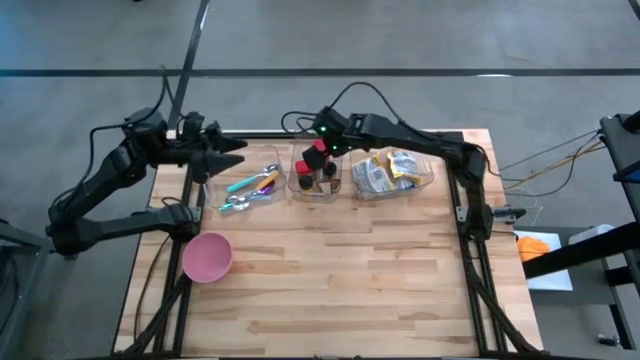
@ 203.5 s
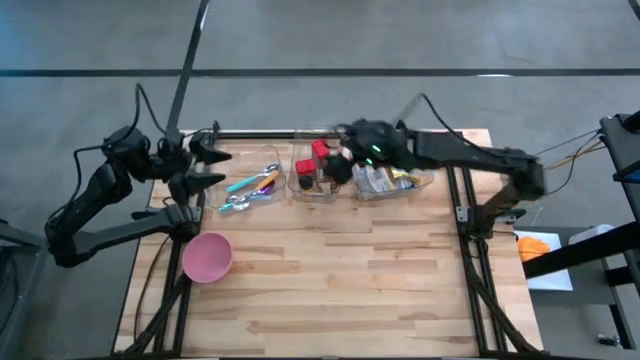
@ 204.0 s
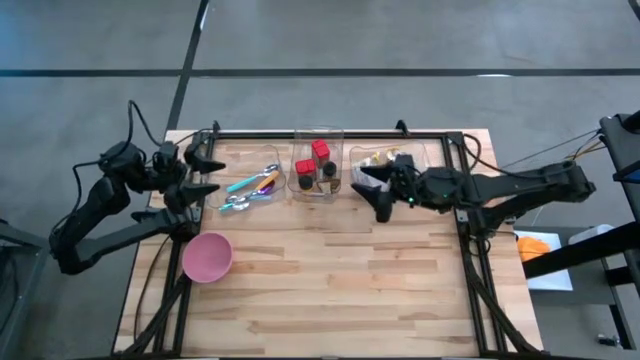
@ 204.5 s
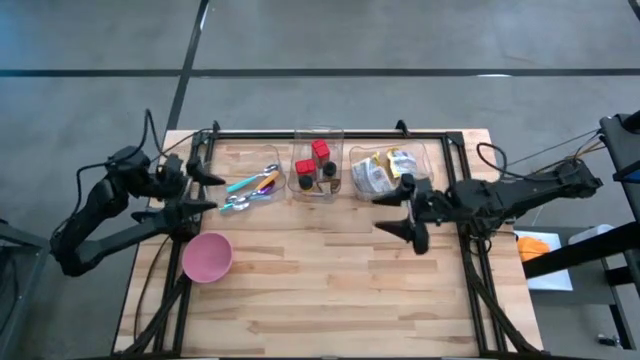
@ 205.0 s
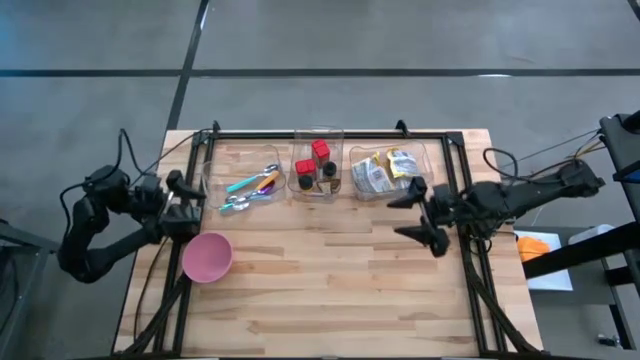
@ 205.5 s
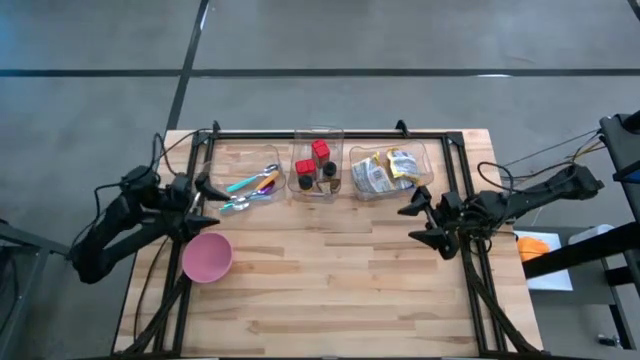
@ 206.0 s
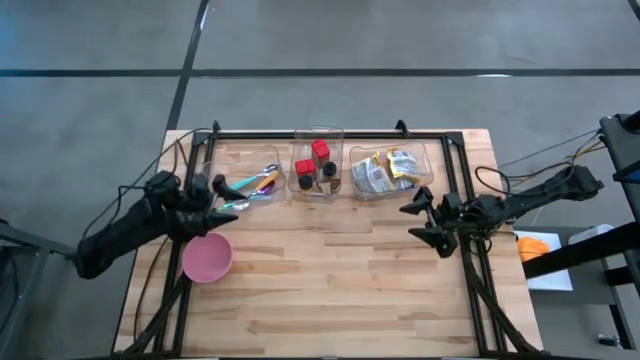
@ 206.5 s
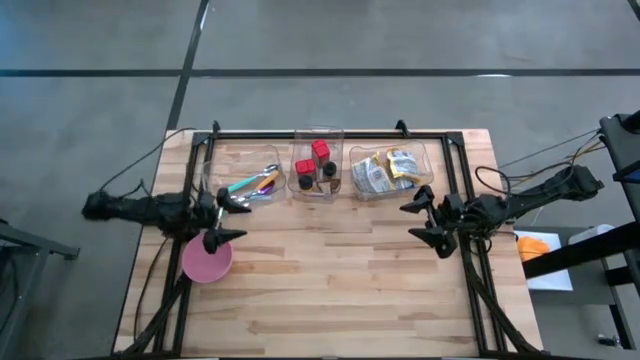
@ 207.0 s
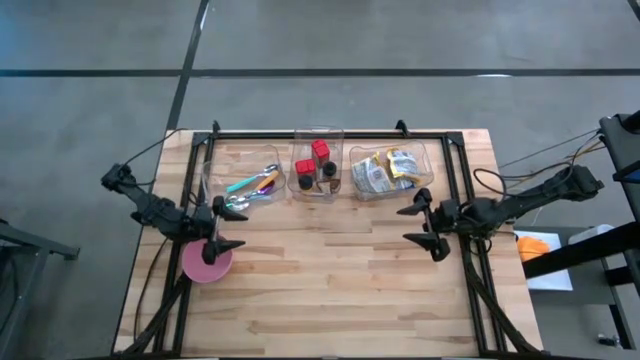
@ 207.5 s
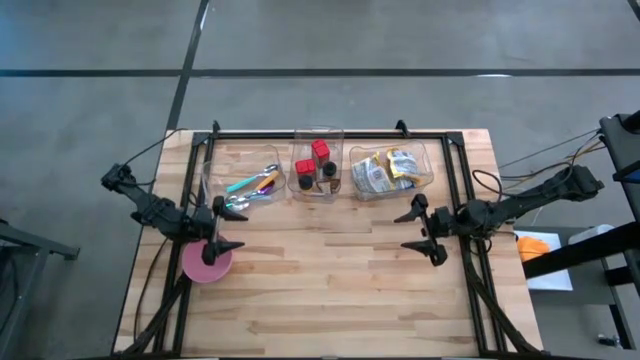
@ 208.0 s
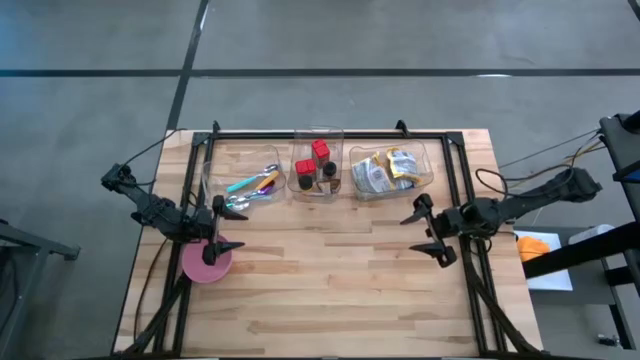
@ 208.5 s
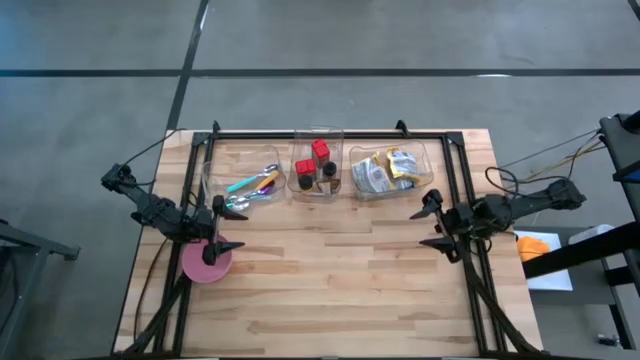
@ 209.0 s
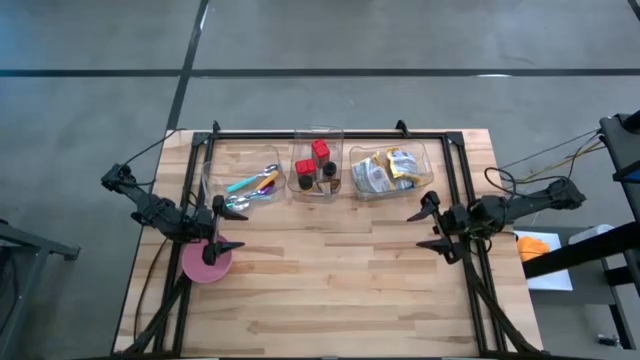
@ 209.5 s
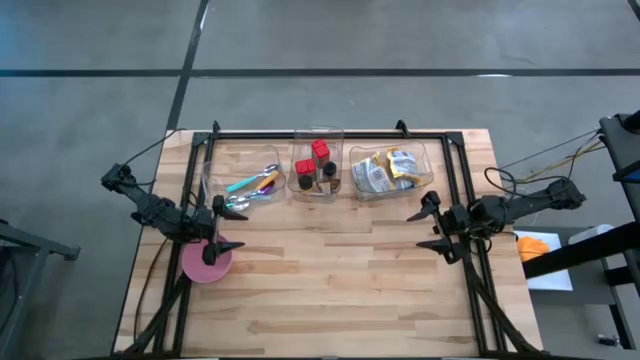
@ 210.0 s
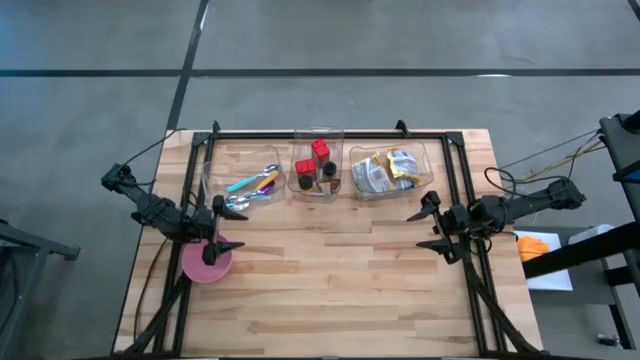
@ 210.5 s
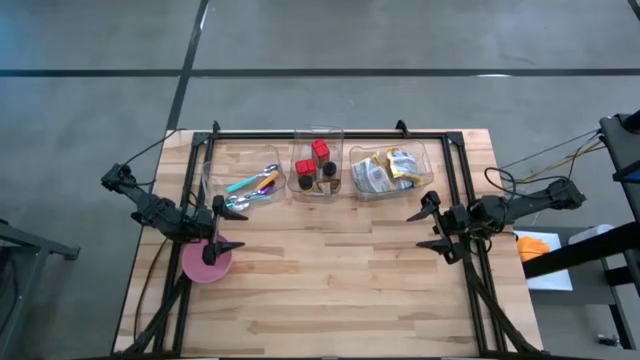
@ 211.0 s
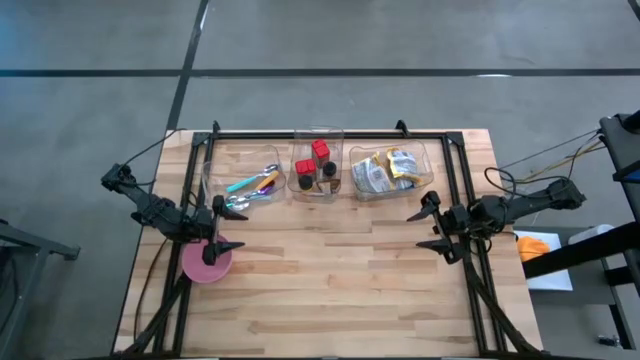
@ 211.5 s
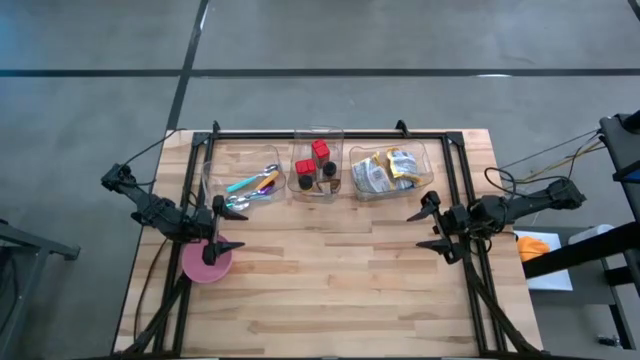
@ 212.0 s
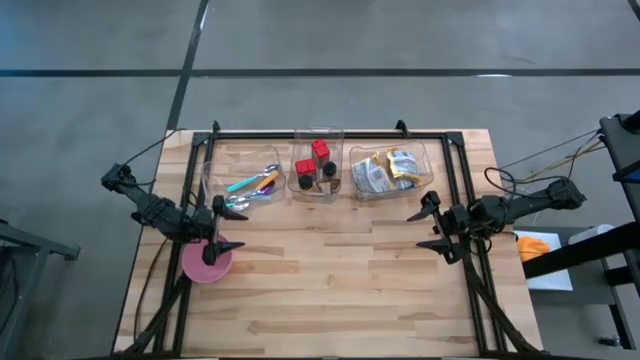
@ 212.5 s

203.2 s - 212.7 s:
Return to Home Position

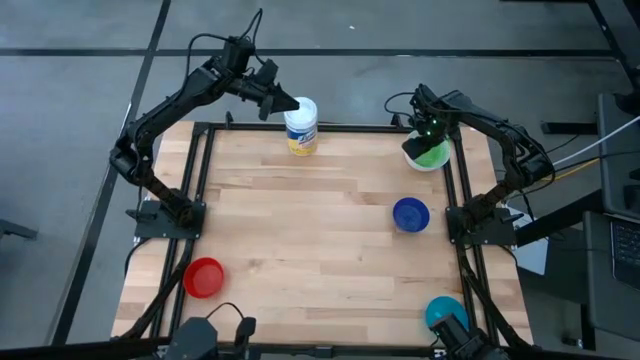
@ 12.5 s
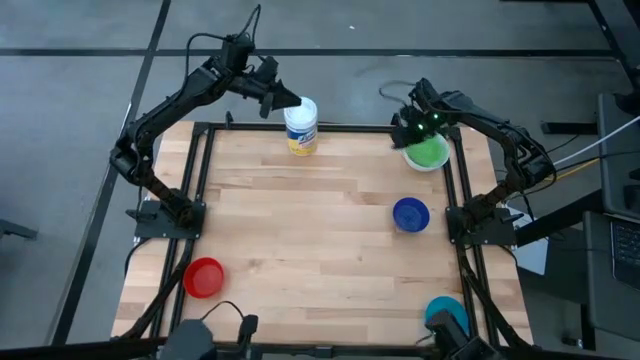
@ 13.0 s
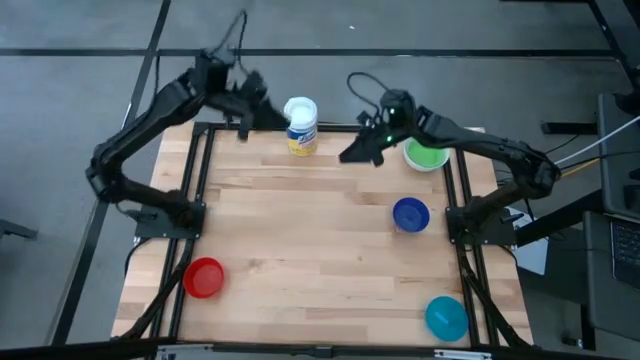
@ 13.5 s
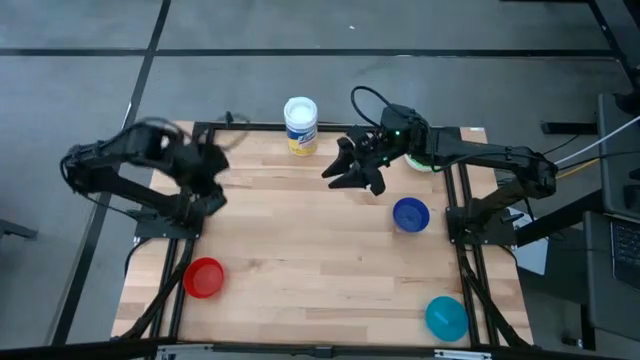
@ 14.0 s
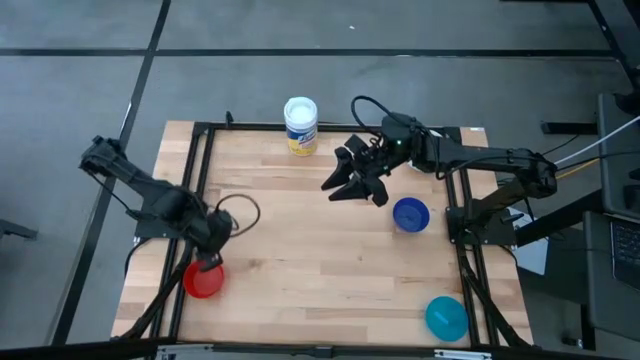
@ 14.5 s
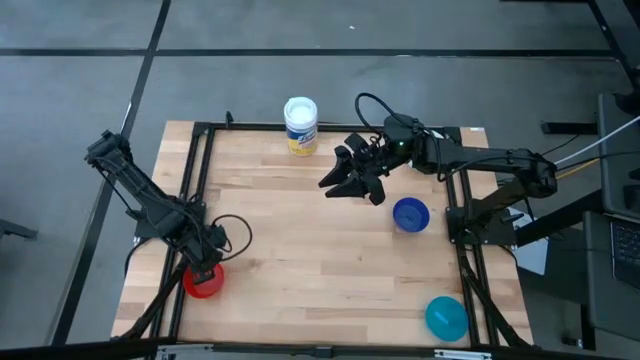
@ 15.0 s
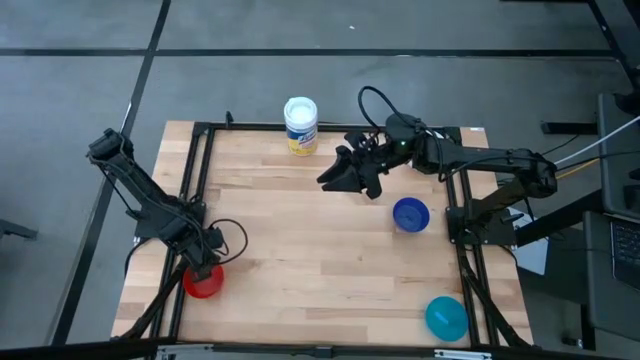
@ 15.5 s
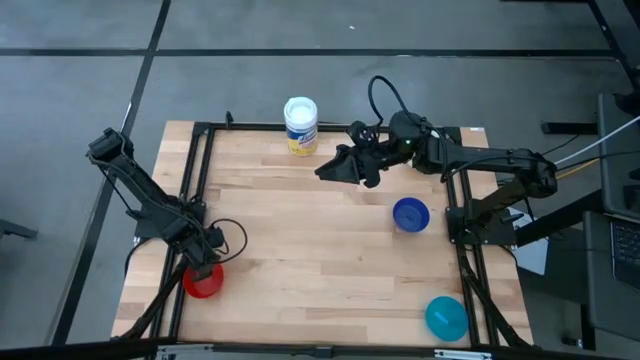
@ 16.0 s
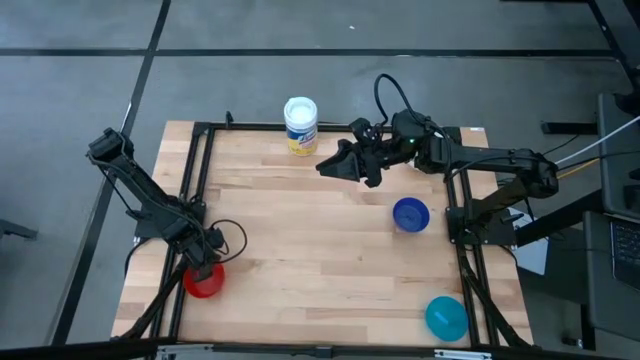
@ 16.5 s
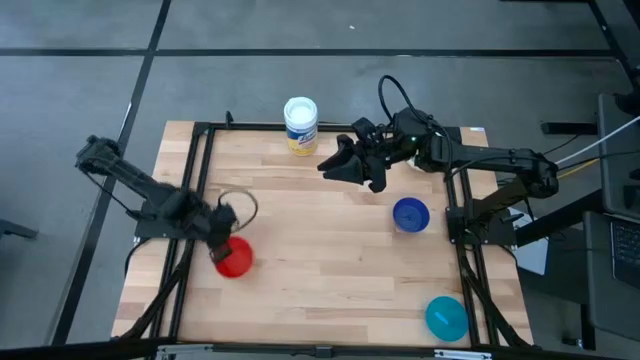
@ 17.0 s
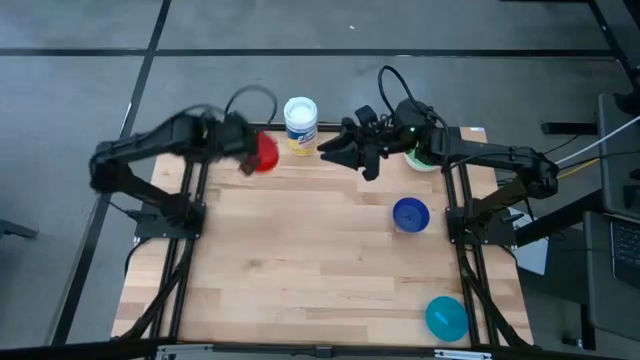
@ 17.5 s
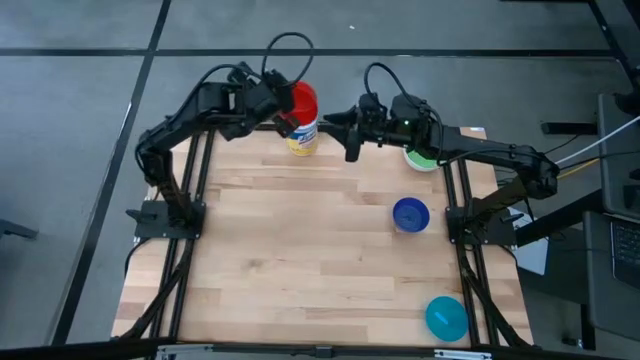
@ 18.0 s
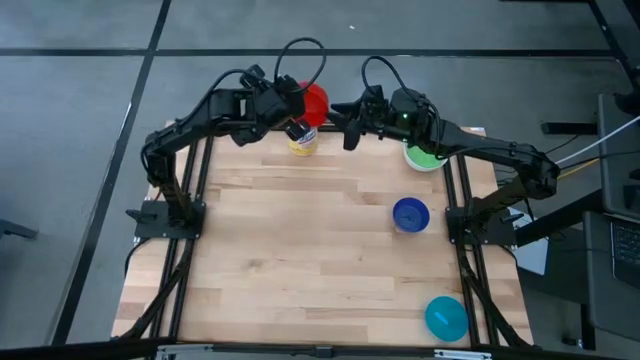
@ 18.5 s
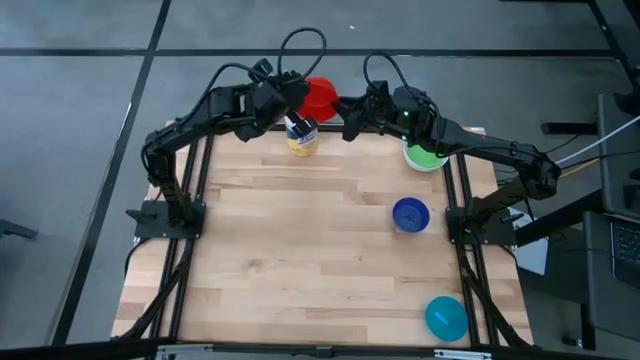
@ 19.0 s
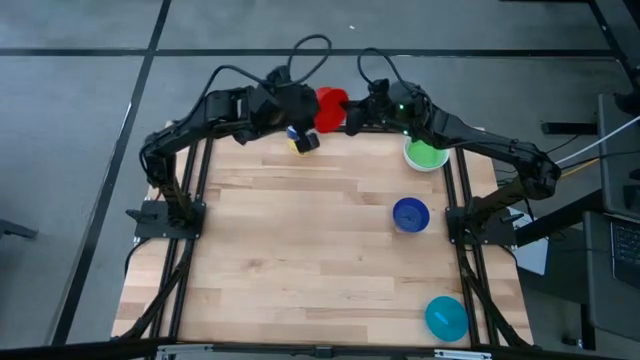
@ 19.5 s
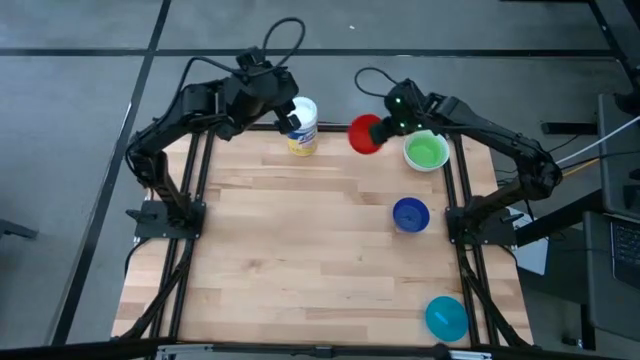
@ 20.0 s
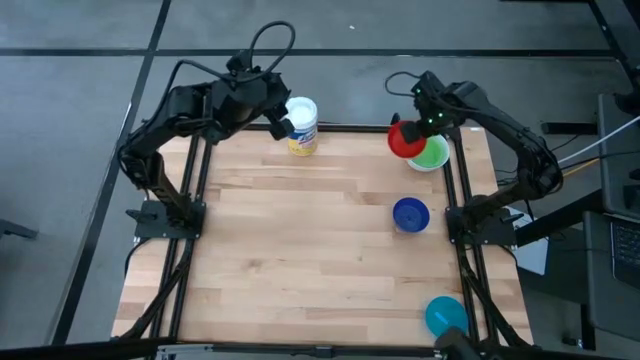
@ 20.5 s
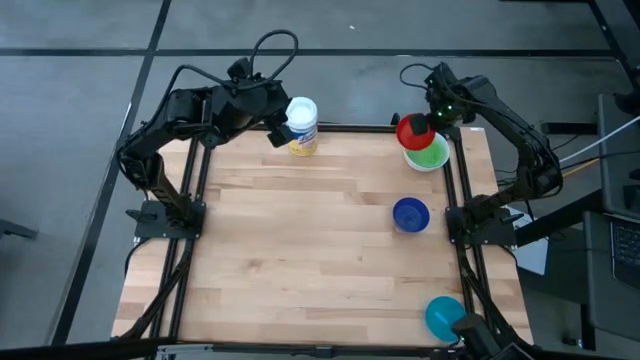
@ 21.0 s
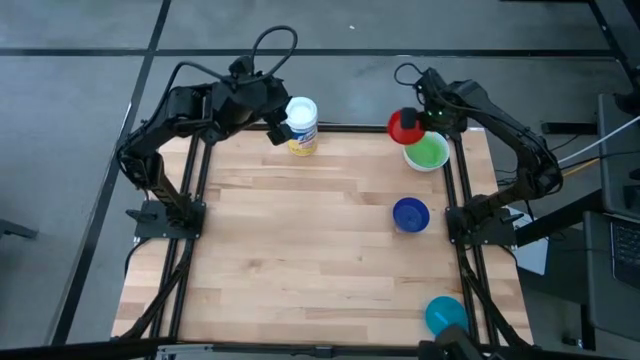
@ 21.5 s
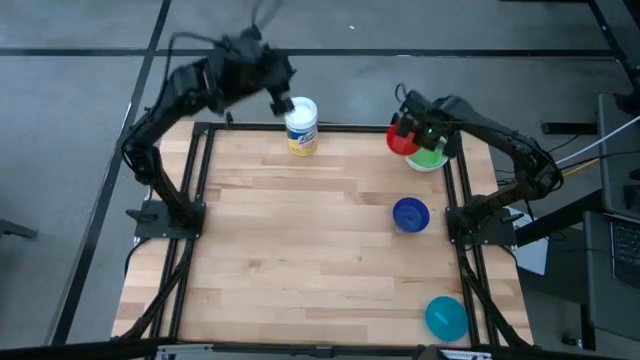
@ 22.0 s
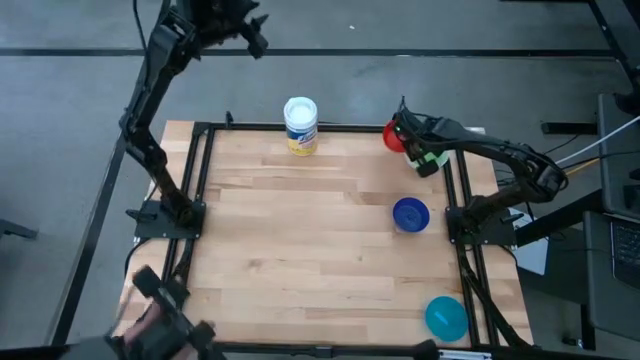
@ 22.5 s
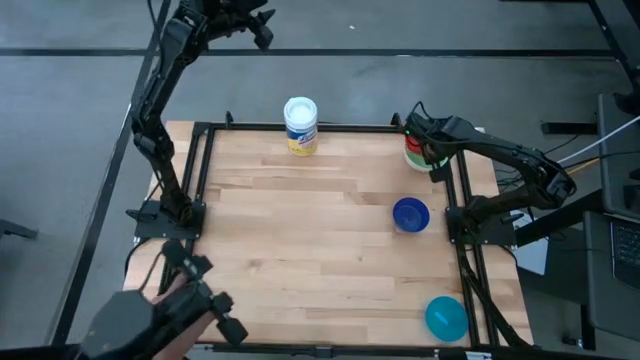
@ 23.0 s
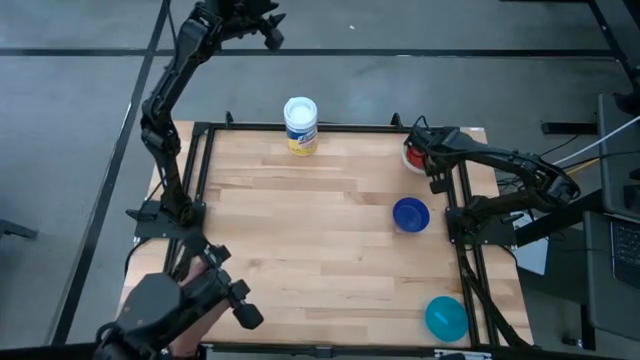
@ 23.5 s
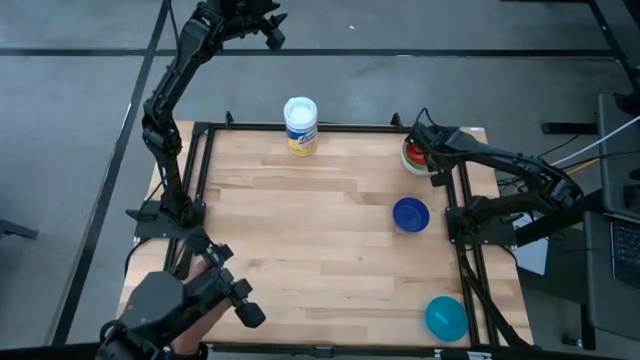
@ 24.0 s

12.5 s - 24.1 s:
Stack the red bowl on the green bowl
